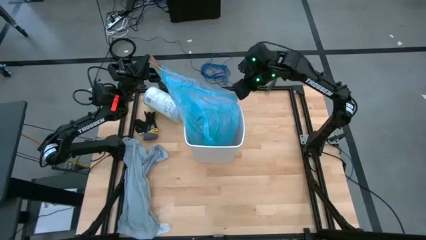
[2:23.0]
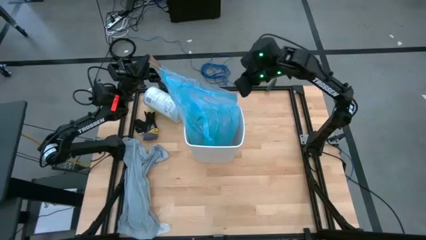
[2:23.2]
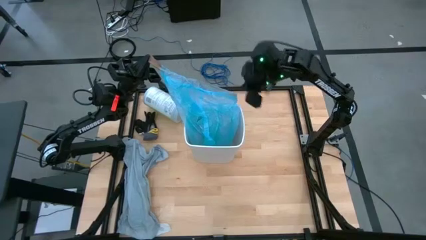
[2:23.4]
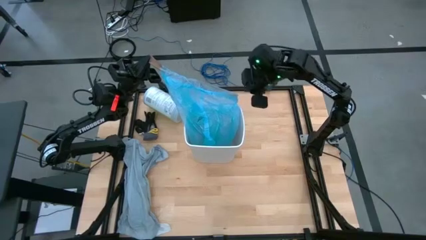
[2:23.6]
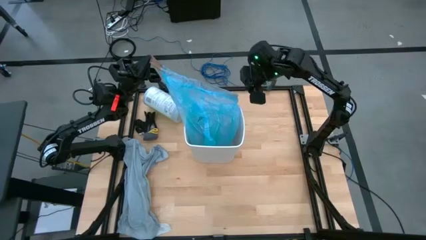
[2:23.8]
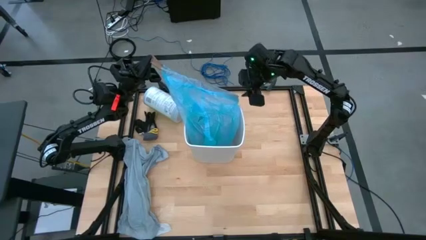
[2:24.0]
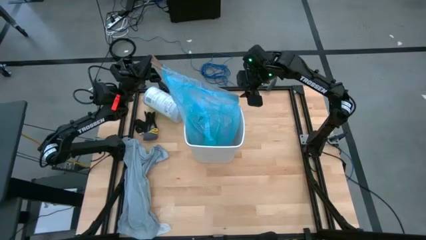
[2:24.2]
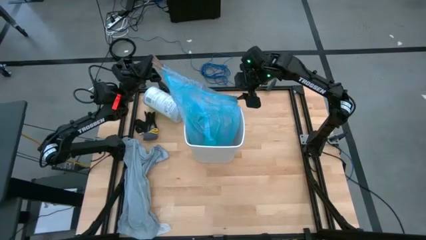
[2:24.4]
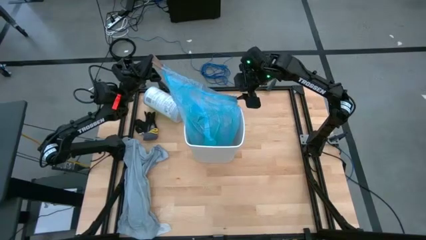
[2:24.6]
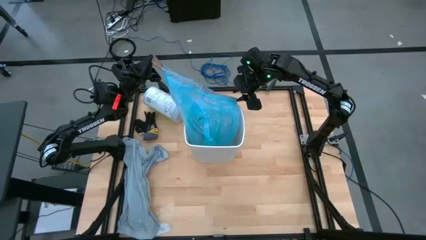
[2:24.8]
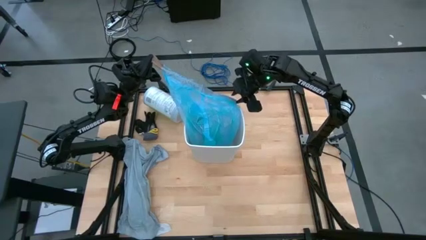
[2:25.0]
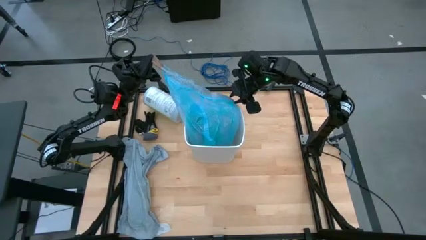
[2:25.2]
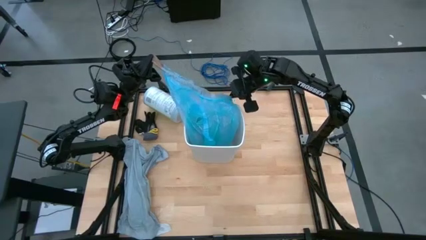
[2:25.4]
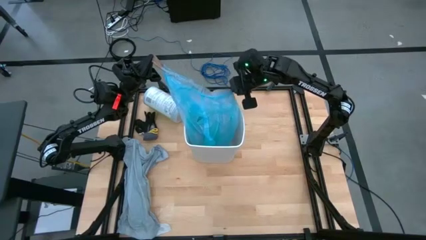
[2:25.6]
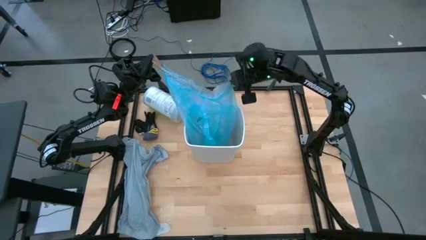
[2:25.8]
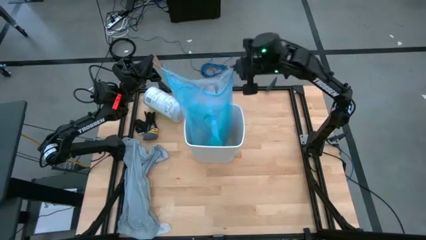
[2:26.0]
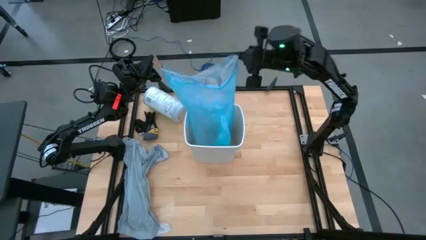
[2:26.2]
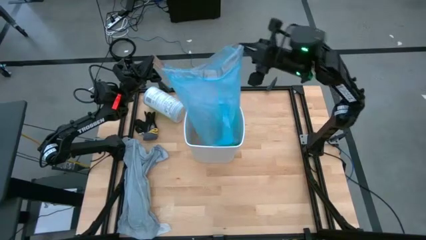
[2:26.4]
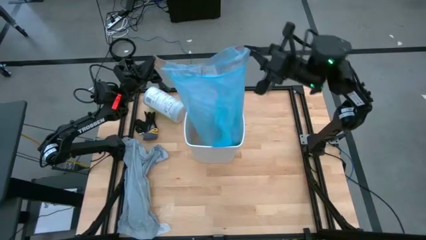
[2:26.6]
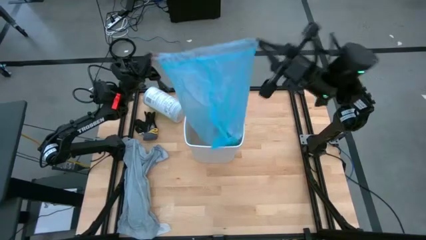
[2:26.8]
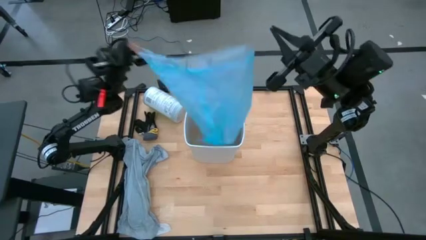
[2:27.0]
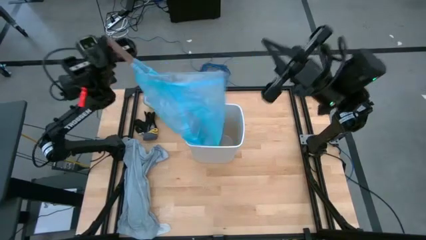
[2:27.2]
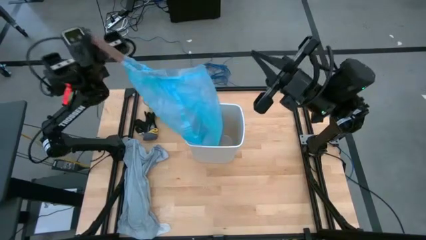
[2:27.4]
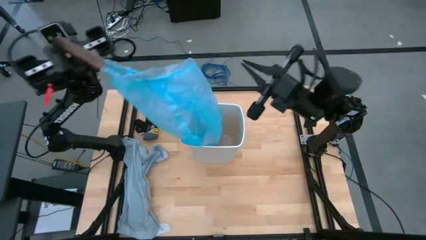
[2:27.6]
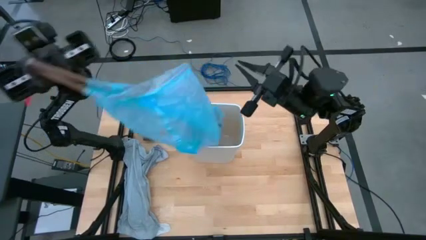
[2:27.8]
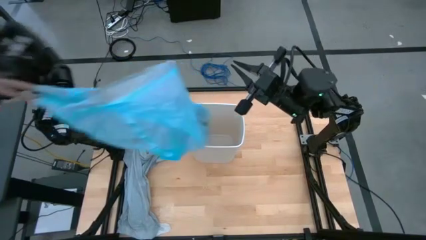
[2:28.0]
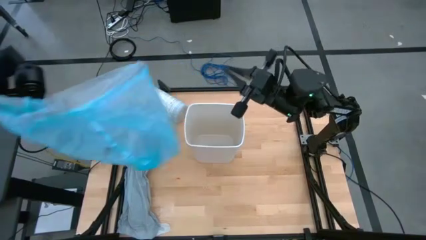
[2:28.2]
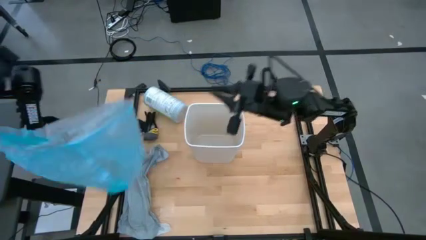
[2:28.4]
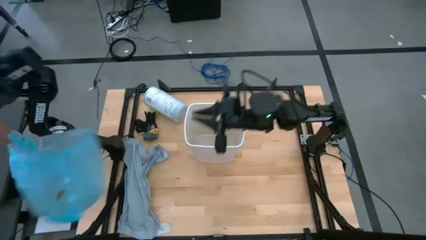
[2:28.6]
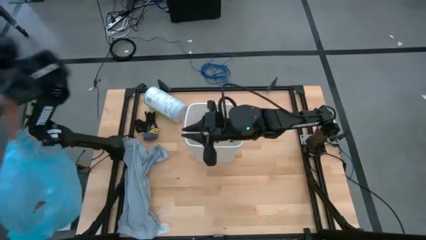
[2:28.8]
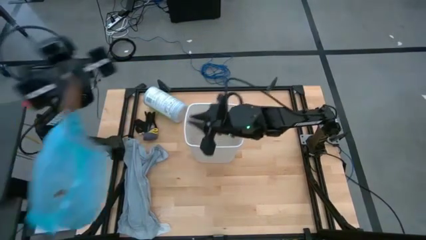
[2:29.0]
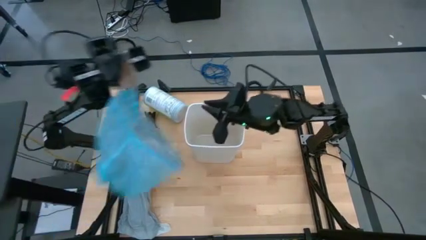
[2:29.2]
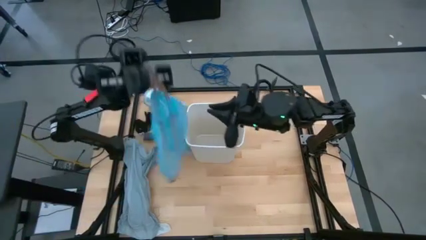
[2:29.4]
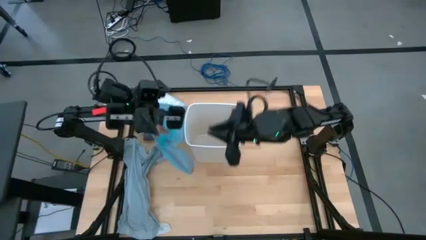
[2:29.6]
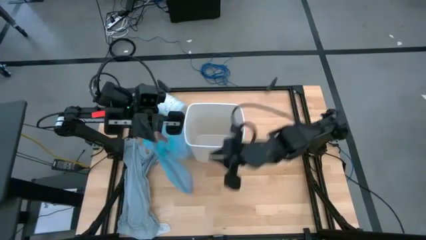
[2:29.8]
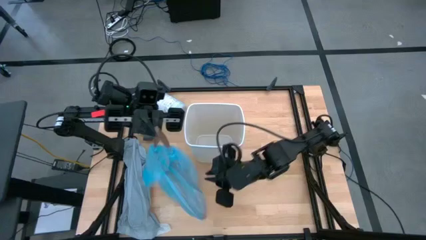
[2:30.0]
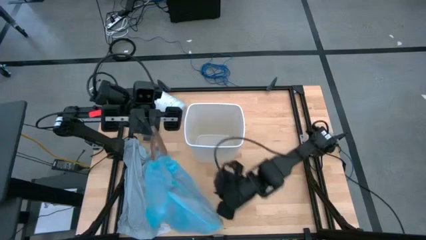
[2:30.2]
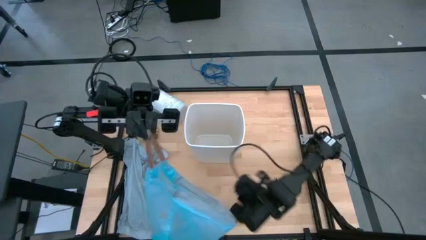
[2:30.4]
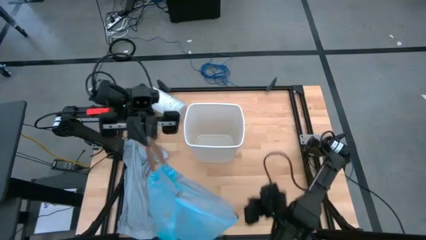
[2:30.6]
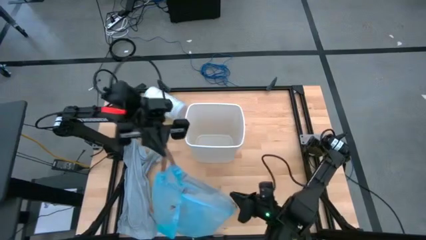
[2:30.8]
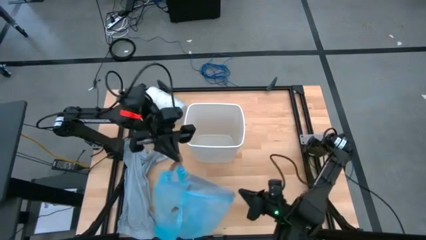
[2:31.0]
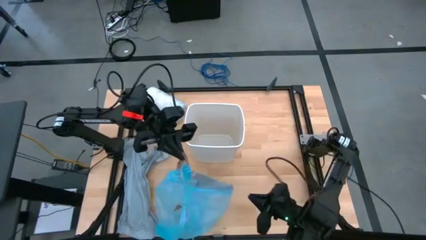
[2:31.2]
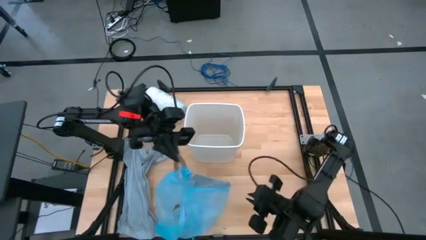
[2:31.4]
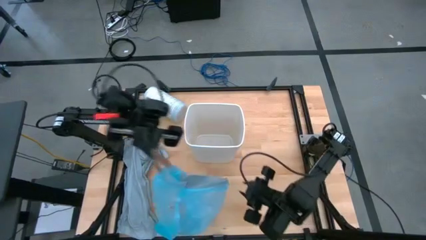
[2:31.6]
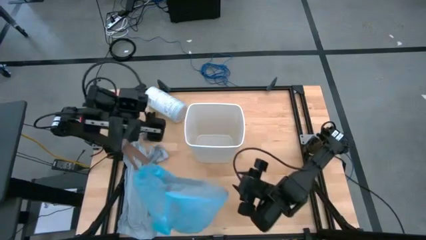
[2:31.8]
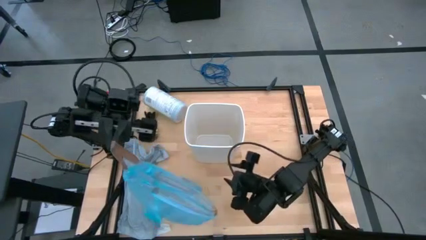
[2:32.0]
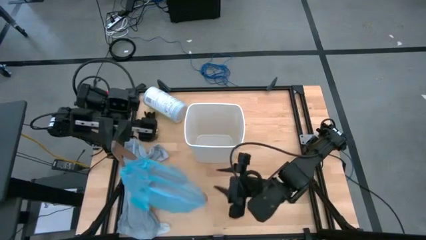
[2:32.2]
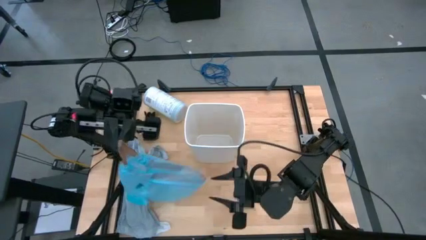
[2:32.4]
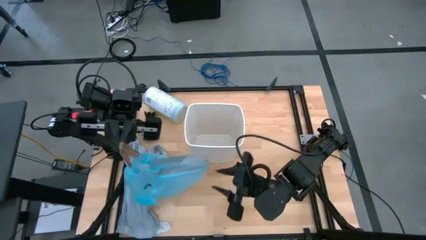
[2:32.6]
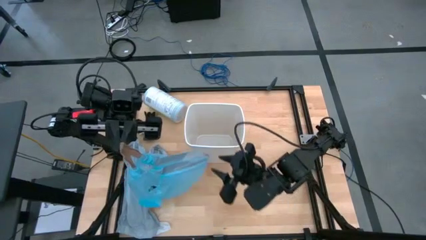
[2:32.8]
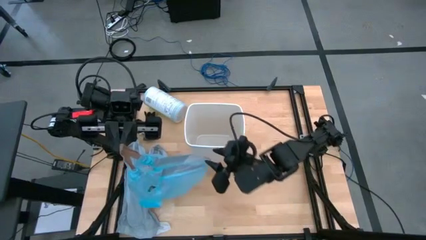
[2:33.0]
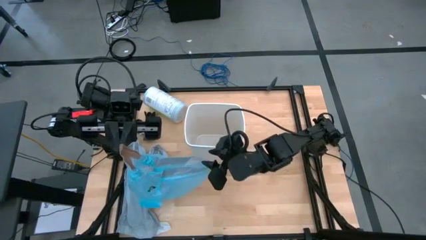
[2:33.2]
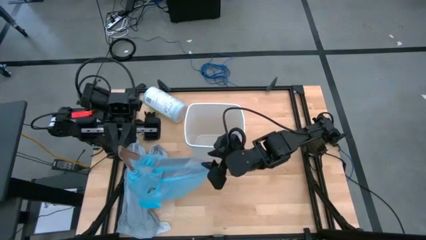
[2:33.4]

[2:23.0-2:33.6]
Task: place trash/remove bag and relplace
Remove the blue trash bag from the trash bin

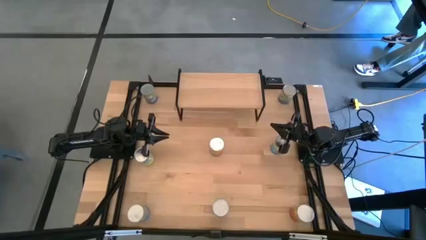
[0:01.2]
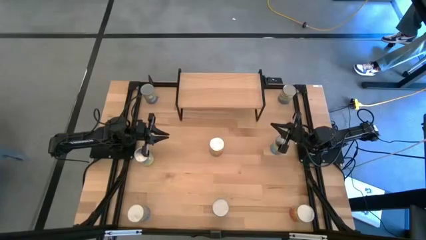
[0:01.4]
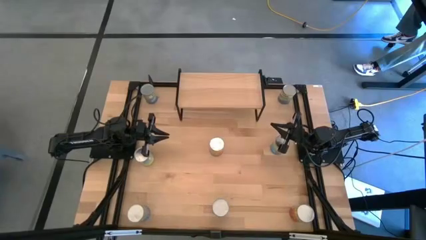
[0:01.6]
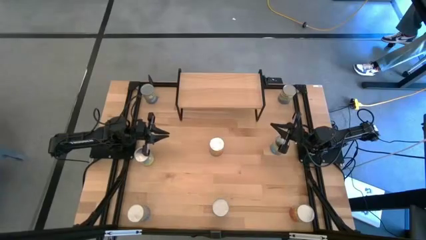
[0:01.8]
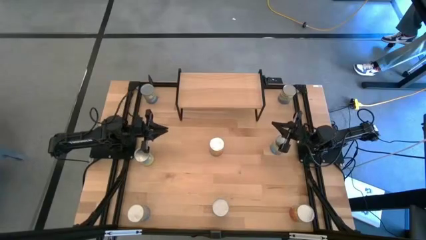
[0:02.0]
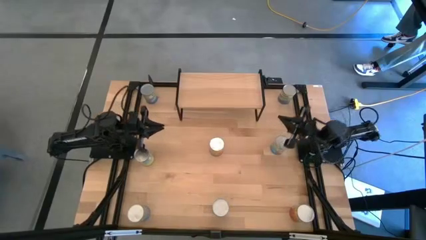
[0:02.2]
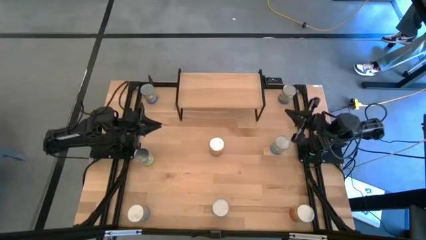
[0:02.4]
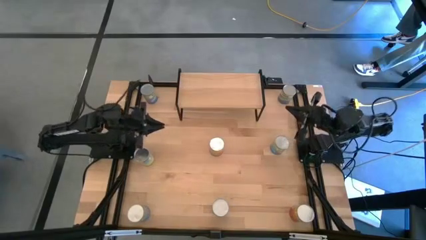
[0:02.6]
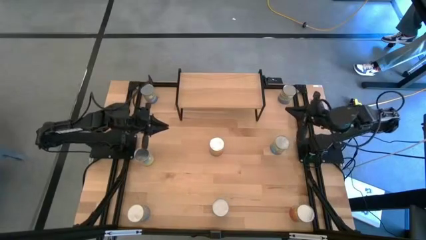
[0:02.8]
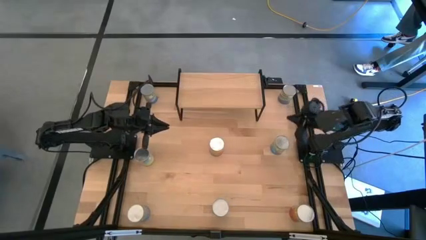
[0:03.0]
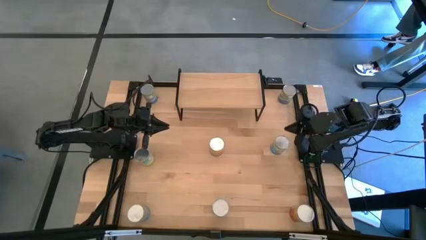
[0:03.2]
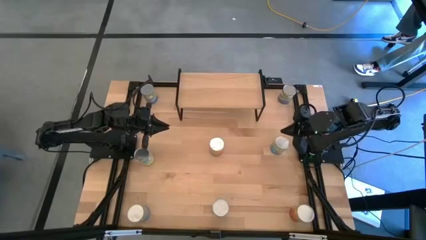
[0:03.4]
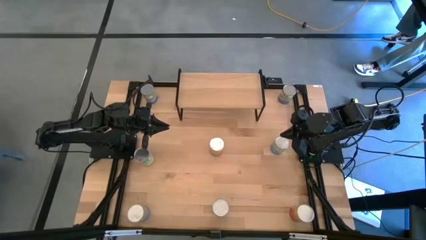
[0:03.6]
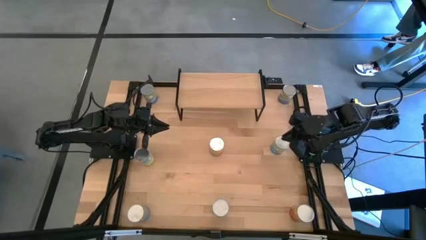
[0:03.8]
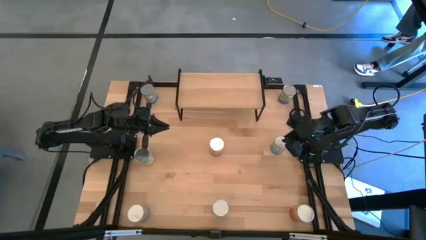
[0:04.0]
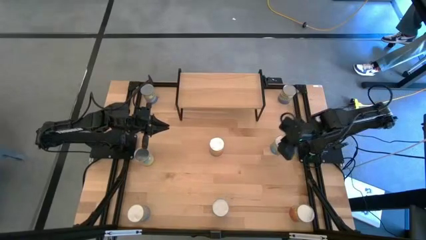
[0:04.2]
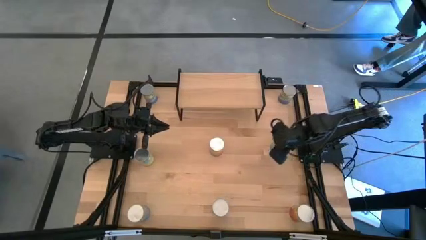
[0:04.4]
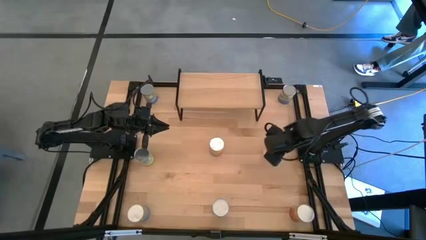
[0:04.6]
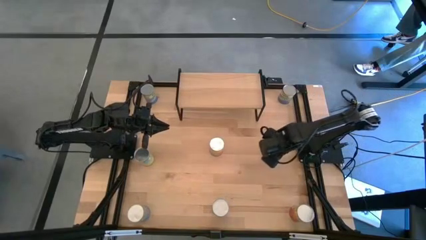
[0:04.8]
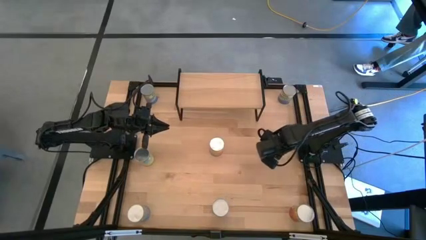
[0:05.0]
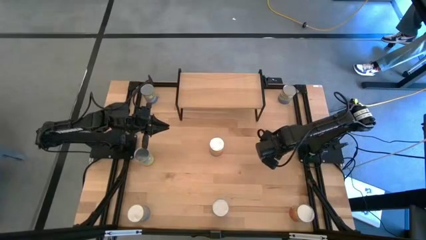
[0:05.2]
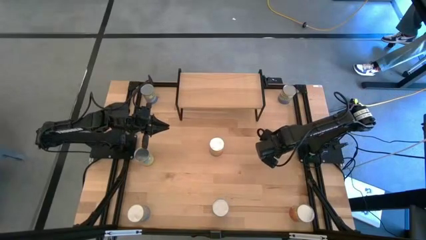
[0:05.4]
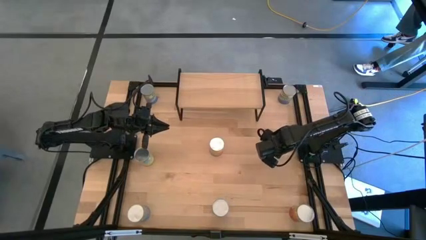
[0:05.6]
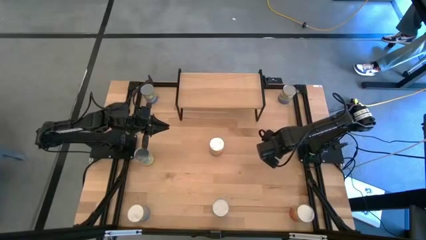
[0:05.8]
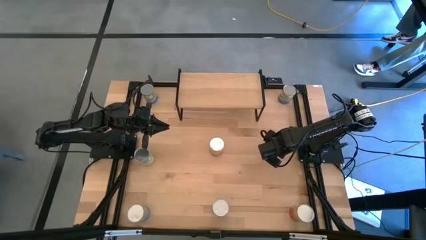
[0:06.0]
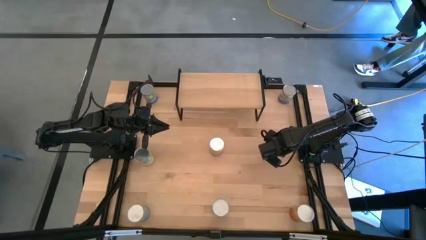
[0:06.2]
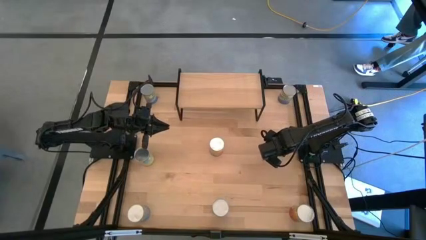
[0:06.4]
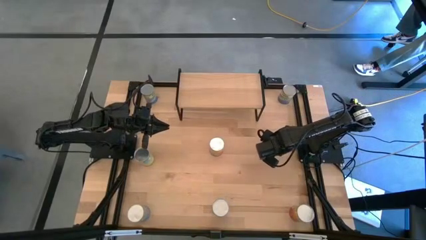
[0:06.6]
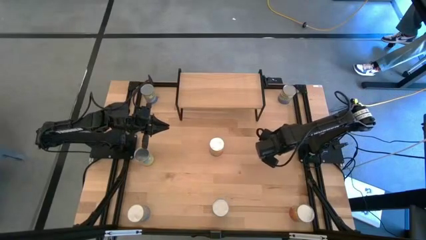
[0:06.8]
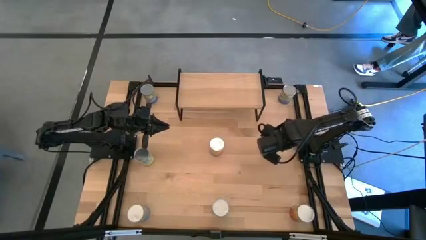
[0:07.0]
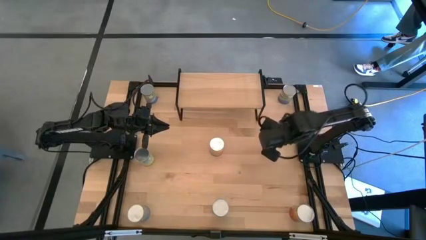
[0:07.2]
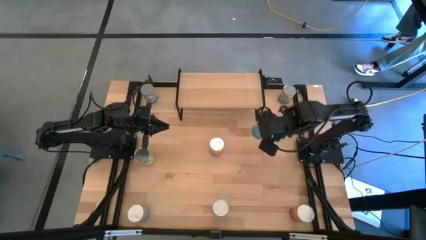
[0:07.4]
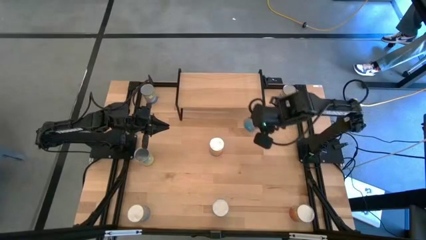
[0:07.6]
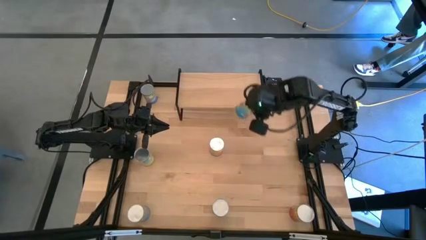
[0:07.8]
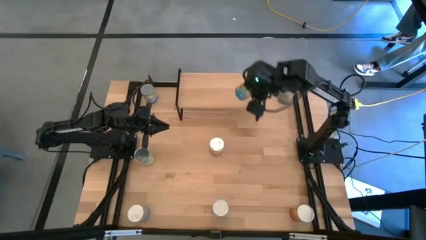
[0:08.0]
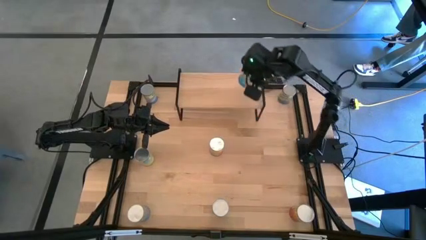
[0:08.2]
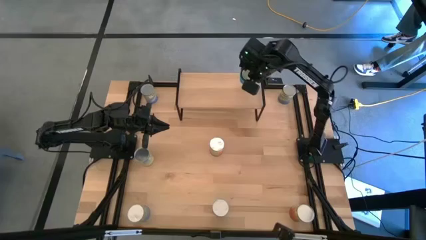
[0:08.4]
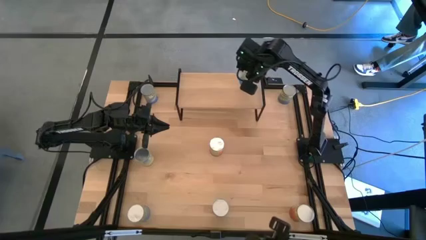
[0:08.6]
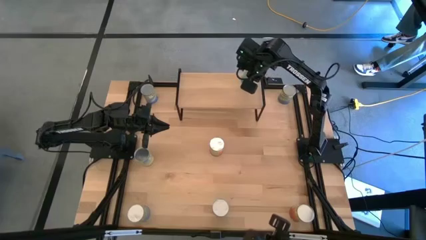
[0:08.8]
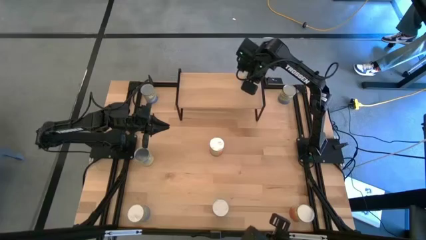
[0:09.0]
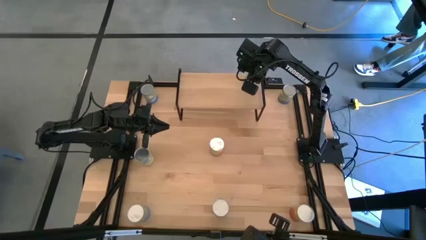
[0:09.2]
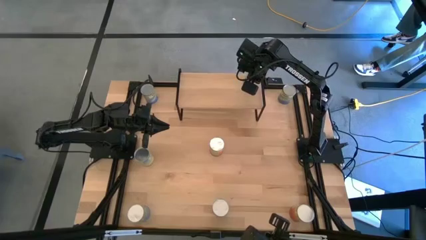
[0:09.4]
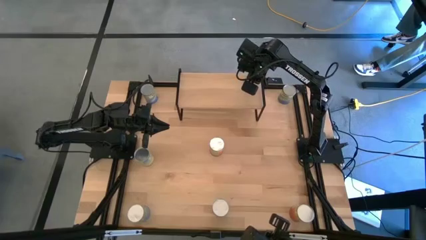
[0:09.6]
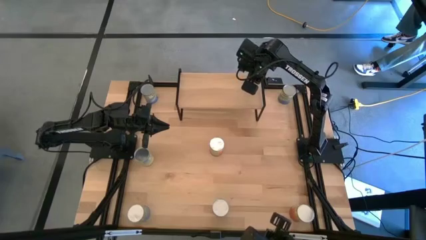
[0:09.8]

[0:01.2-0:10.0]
Task: Pick and place cans onto a shelf
Put the canned tomatoes on the shelf
